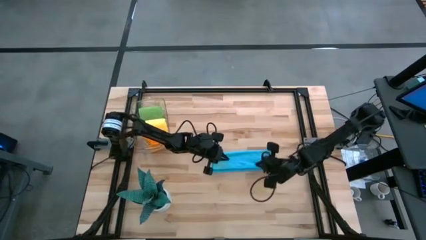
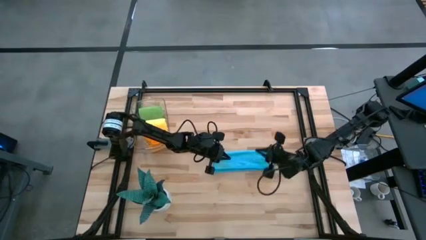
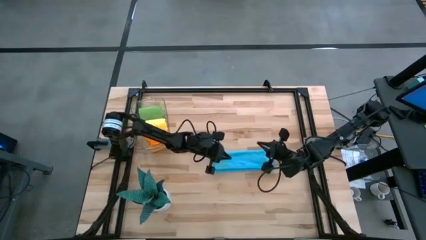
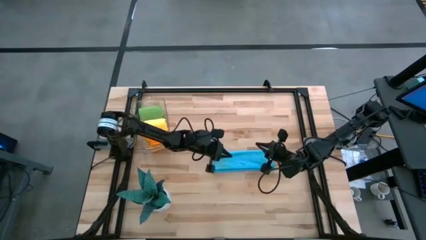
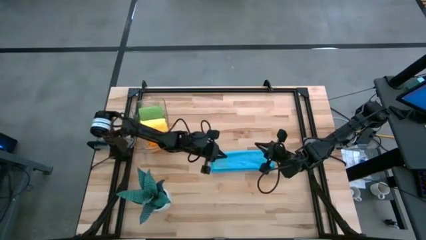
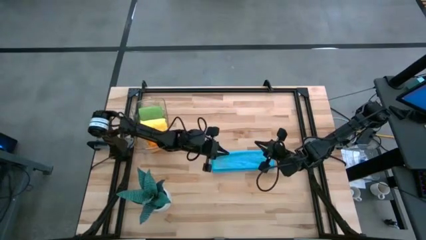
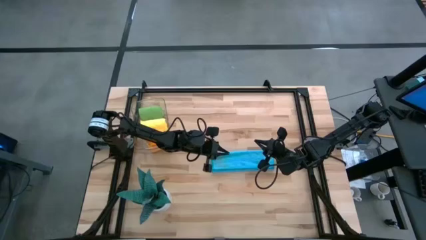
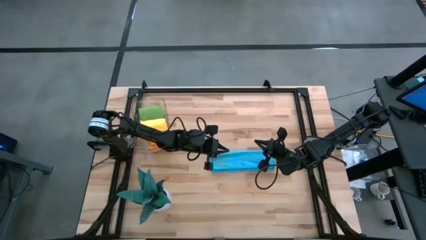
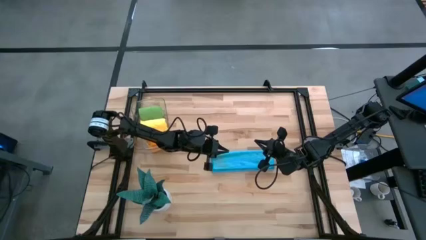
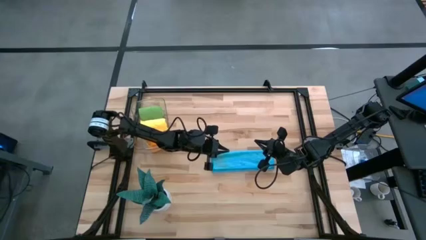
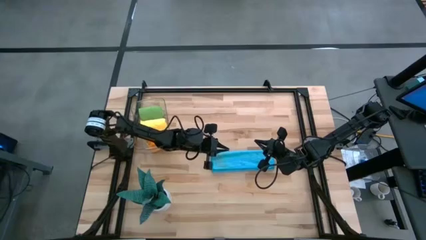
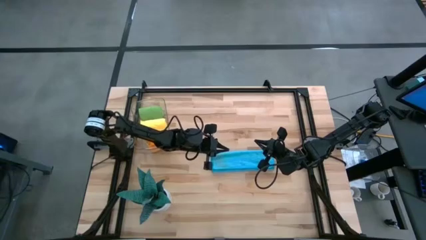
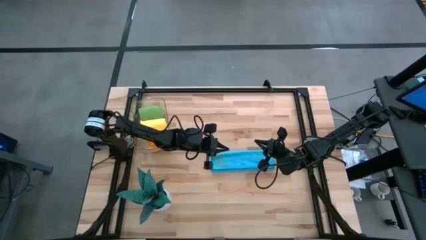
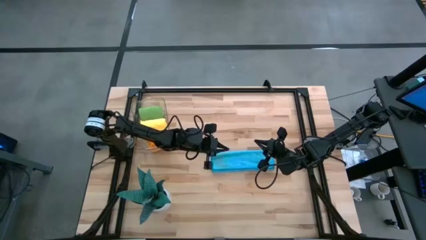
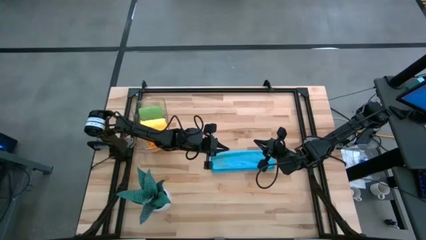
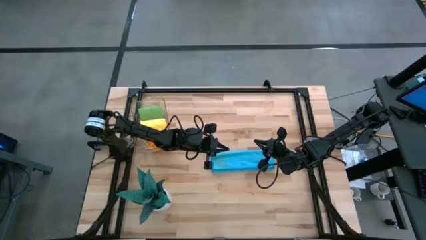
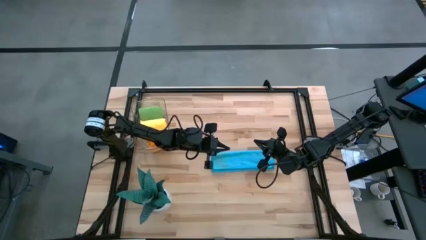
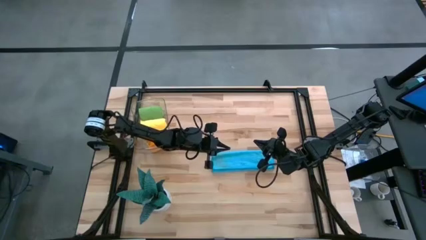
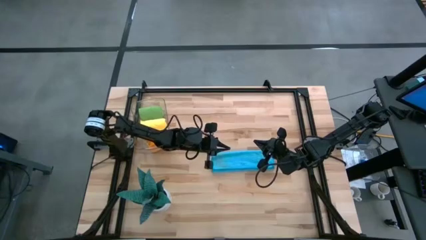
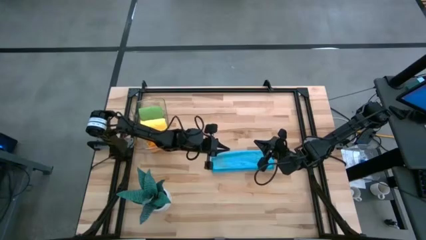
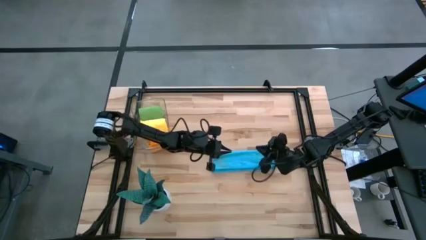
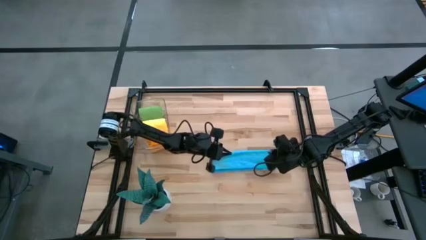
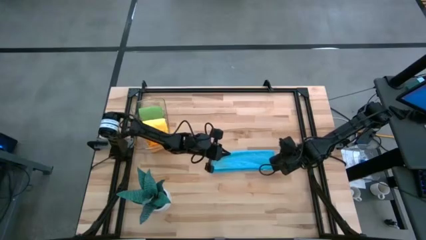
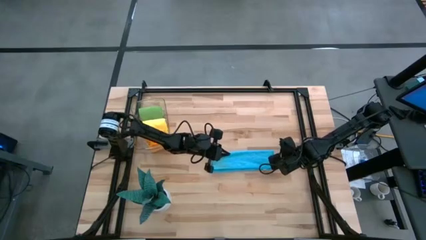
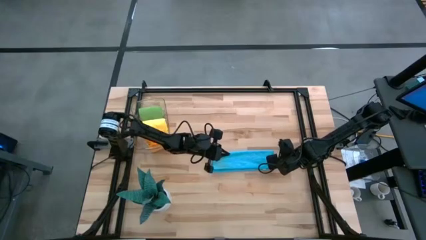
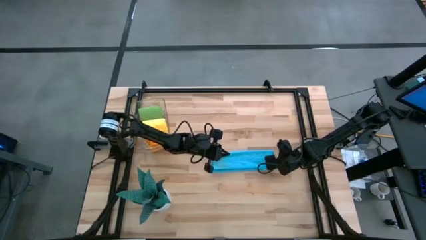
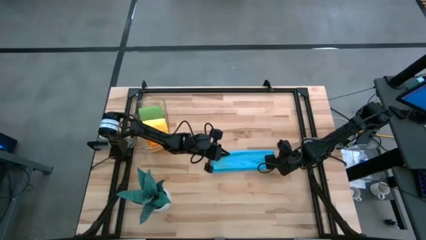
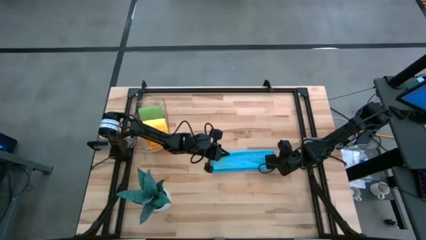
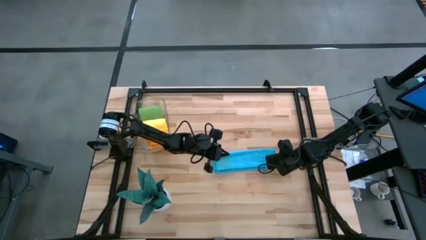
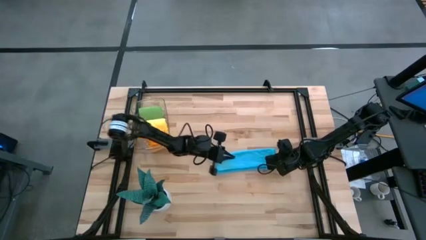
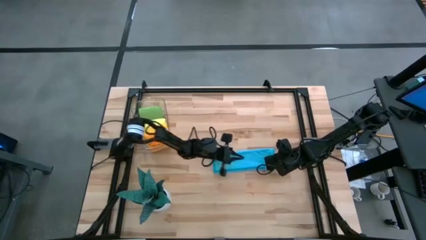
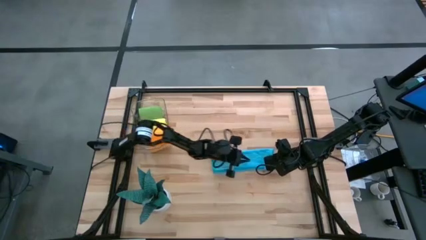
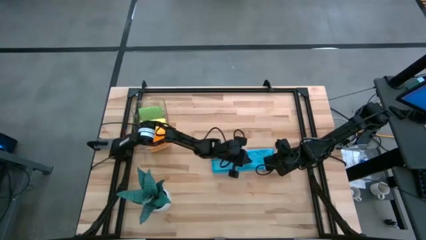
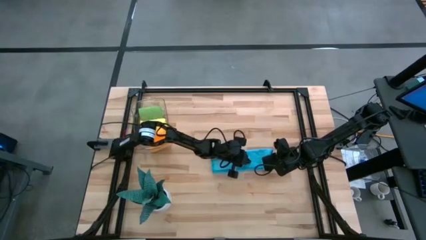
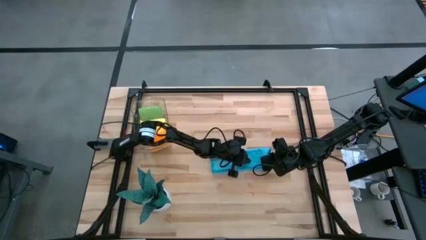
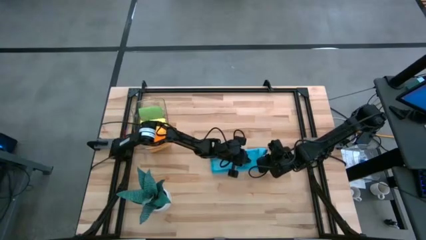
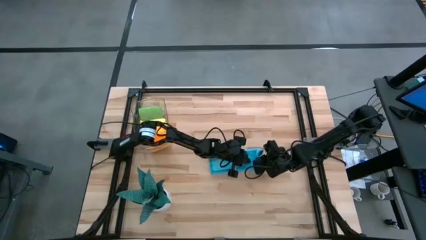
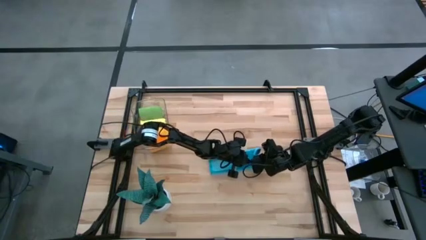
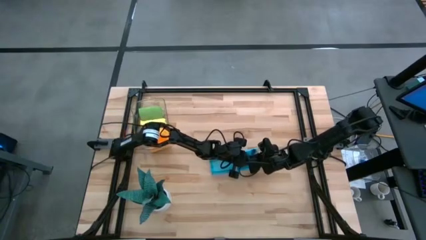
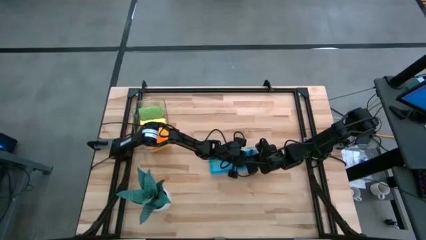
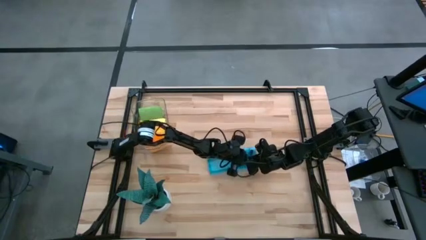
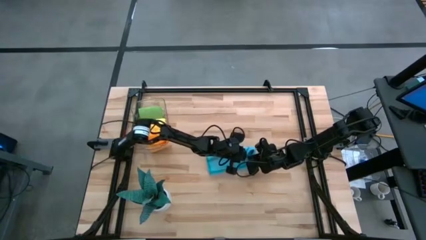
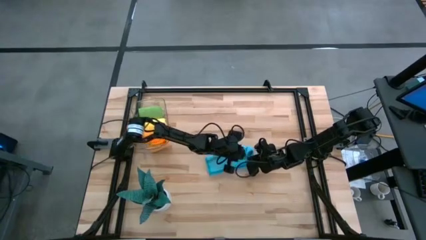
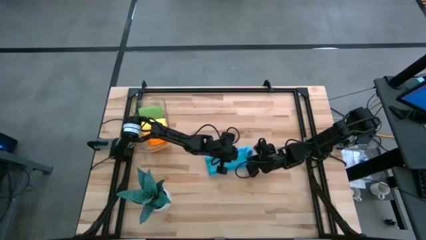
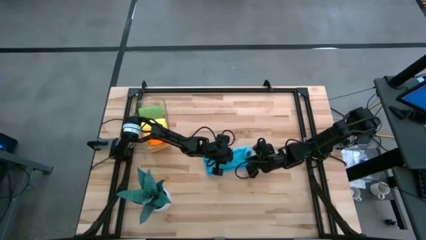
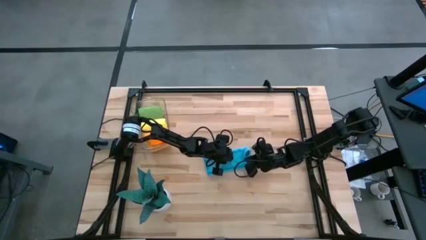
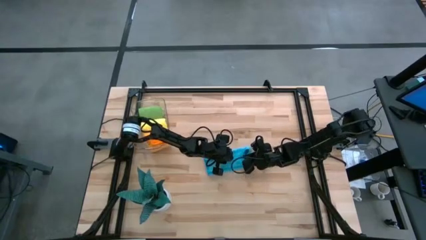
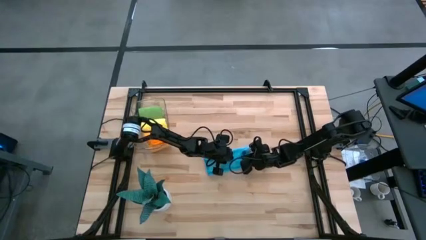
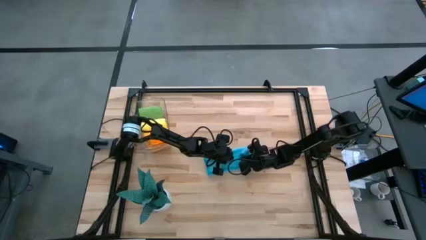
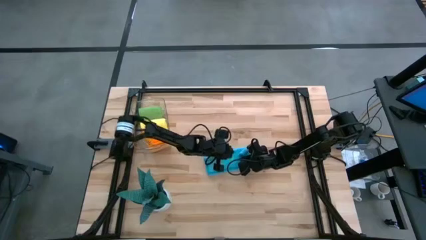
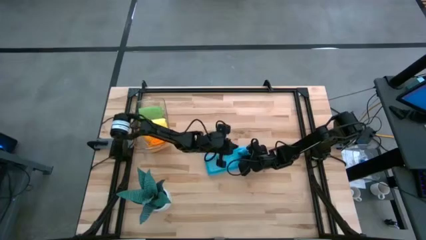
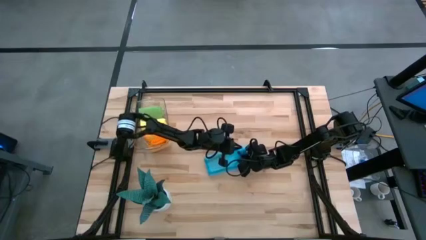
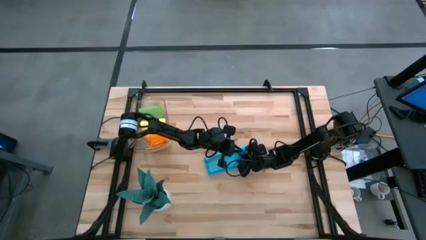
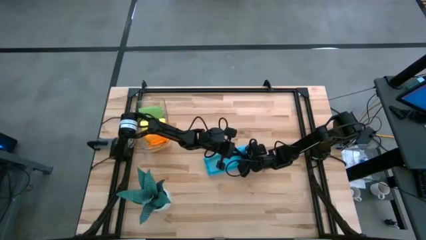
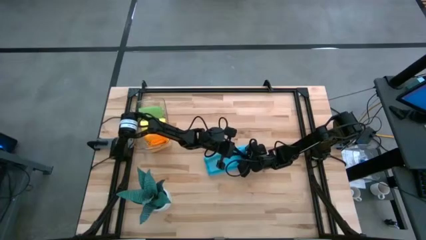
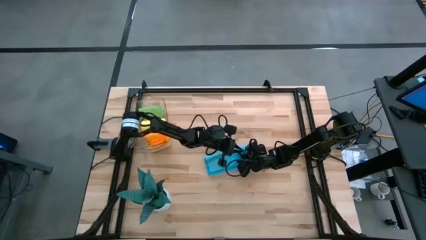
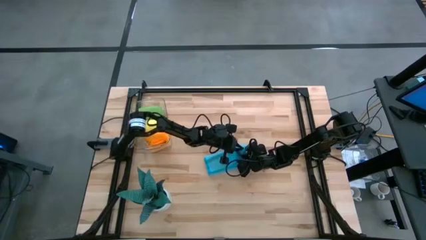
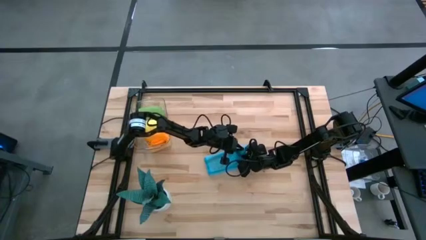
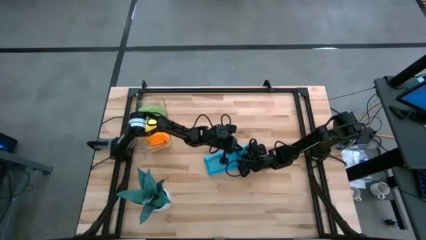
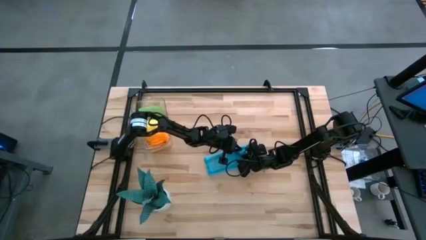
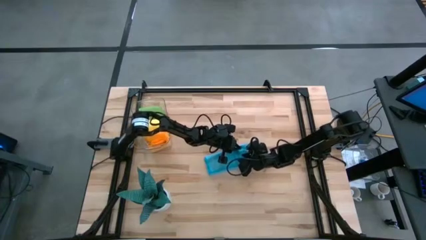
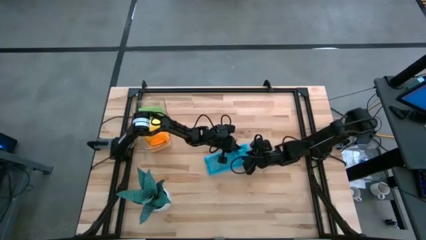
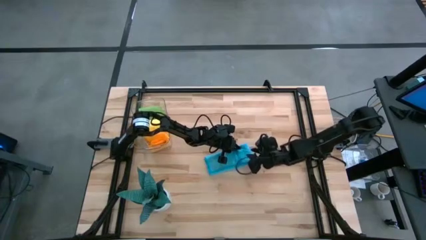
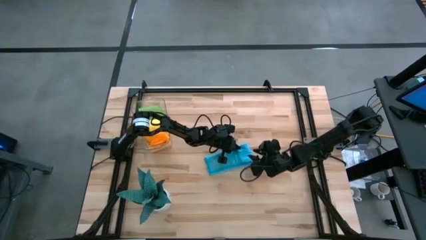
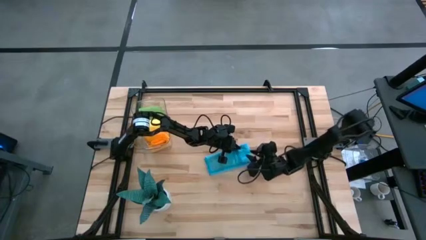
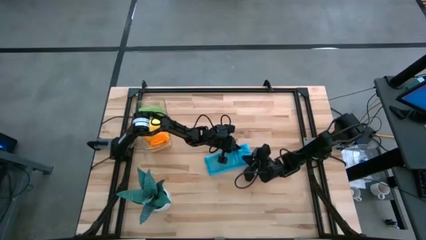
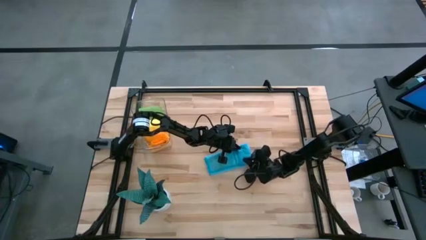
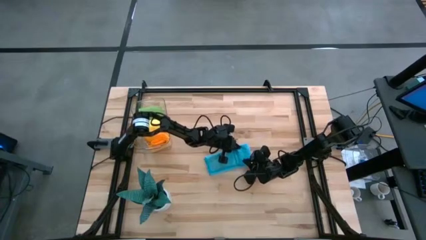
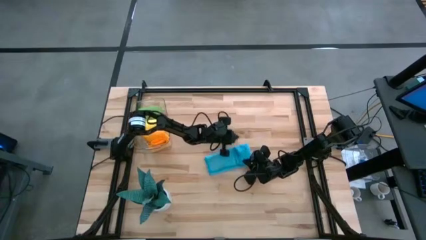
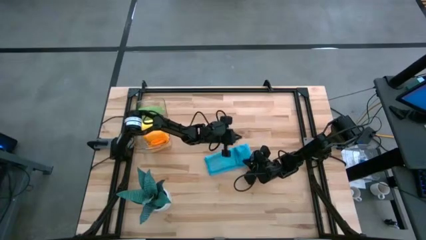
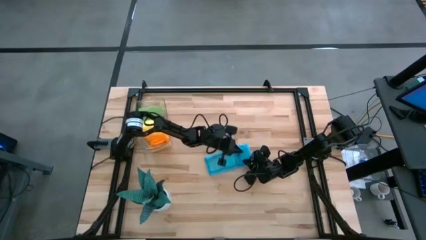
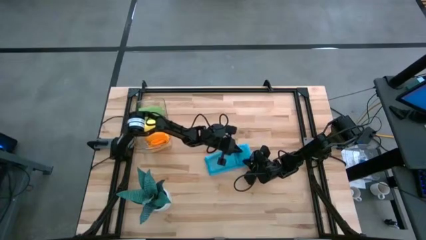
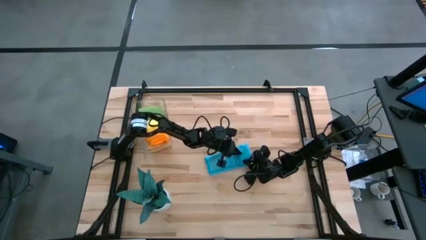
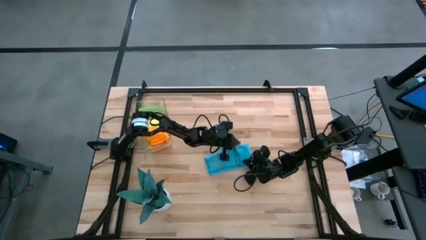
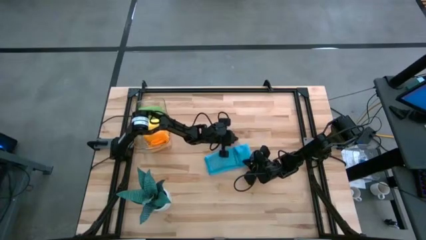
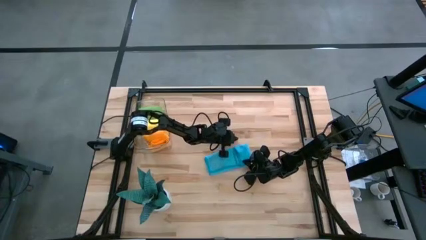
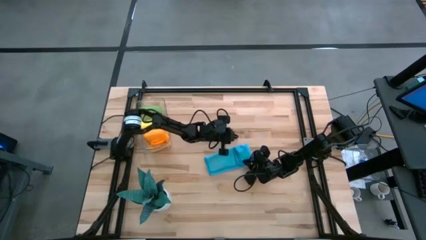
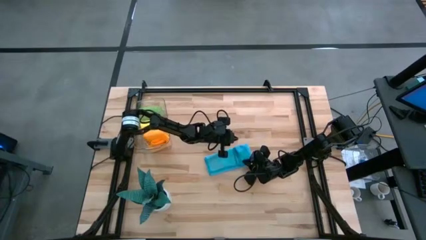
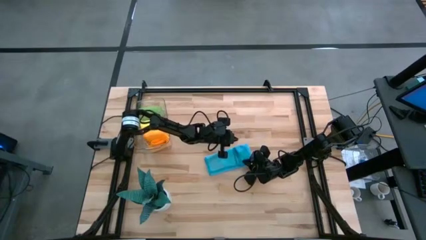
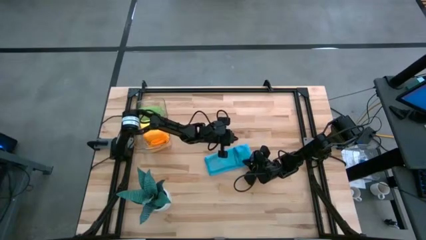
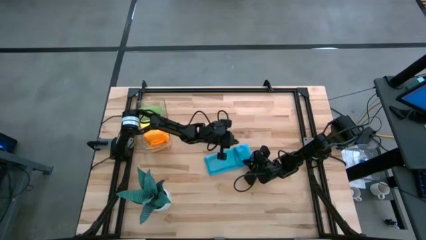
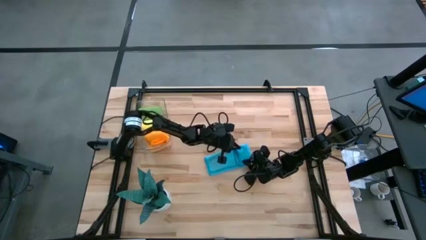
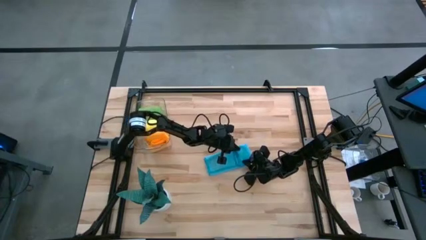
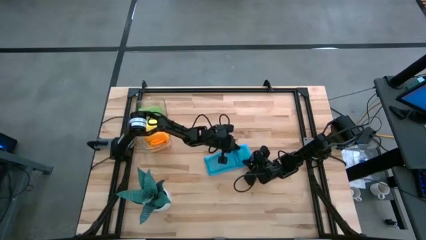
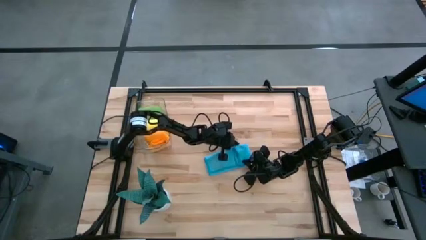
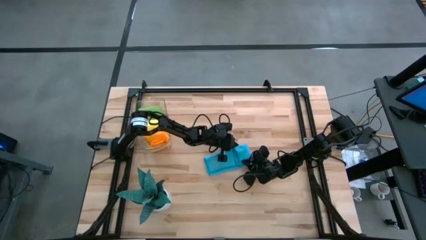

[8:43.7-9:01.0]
Task: Roll microfiber towels into tight, uniform cylinder then place into a basket
Roll the blue microfiber towel
